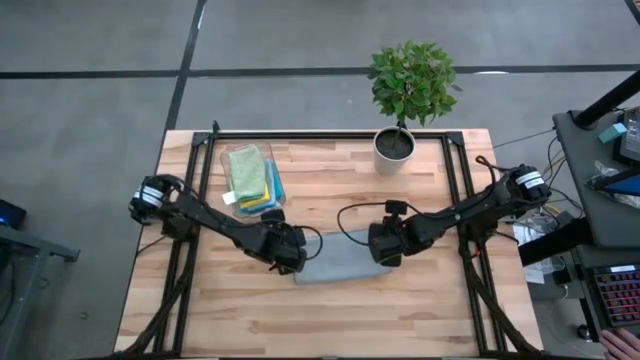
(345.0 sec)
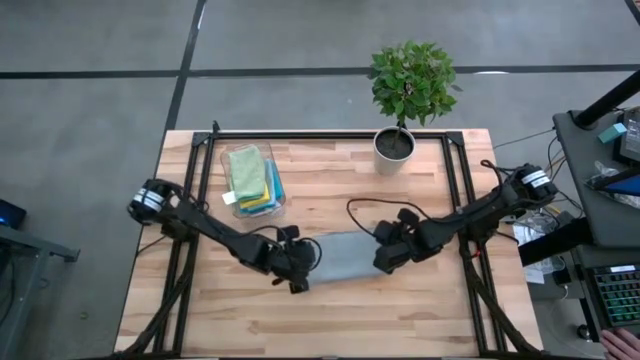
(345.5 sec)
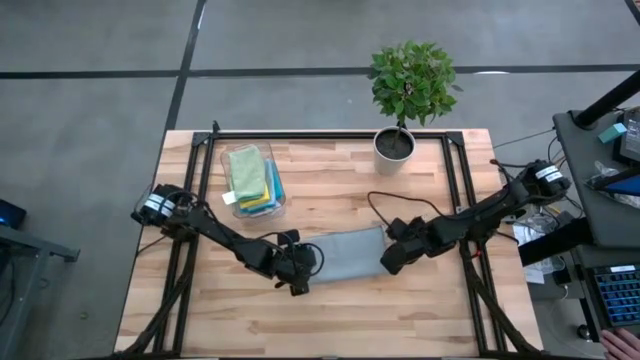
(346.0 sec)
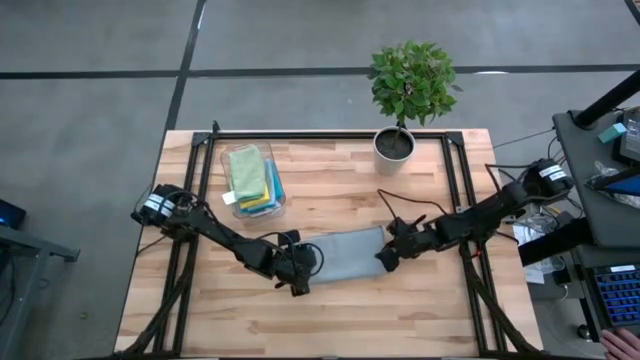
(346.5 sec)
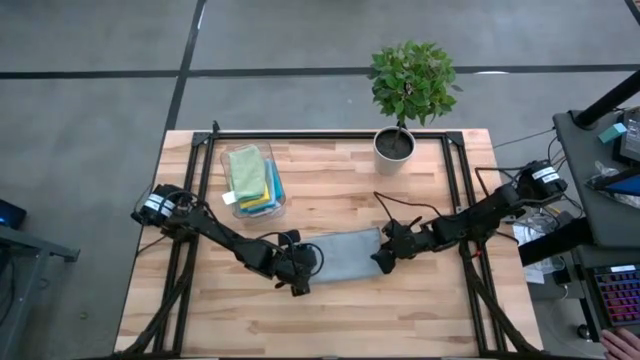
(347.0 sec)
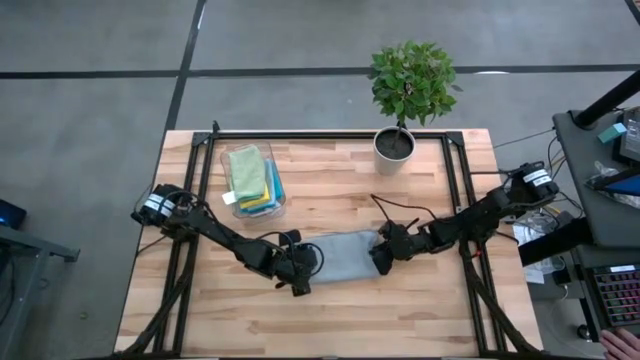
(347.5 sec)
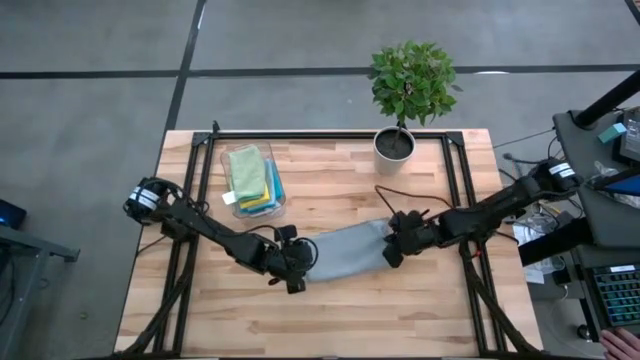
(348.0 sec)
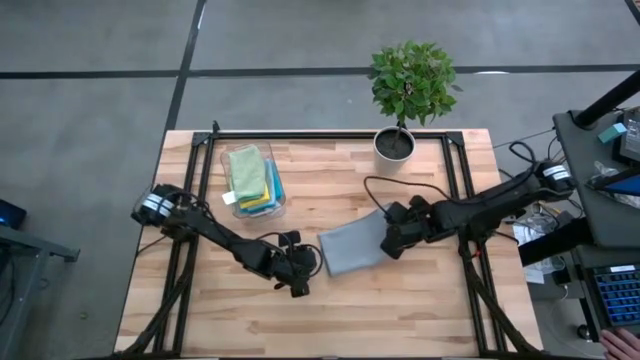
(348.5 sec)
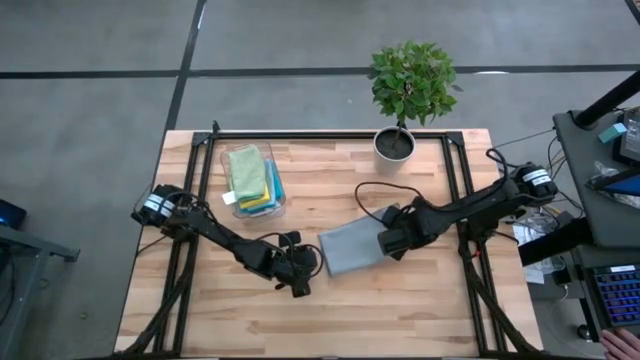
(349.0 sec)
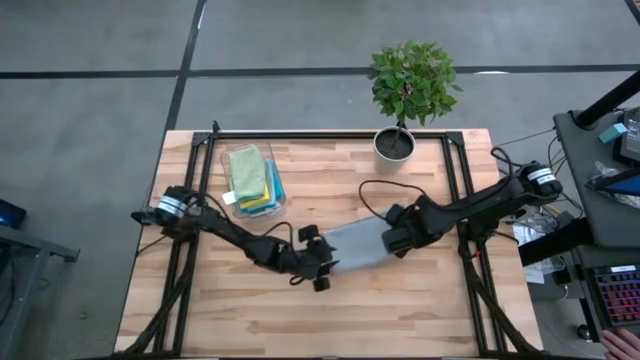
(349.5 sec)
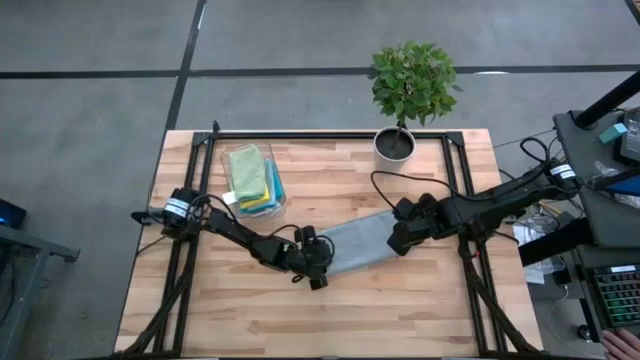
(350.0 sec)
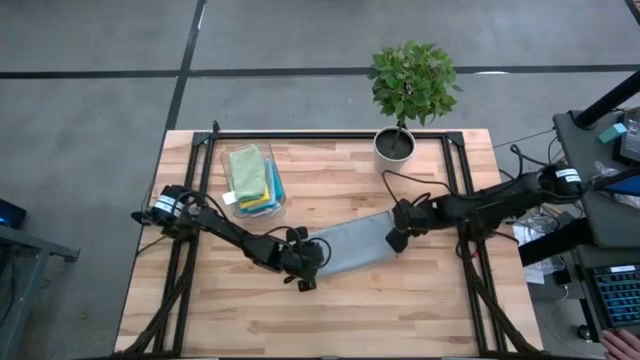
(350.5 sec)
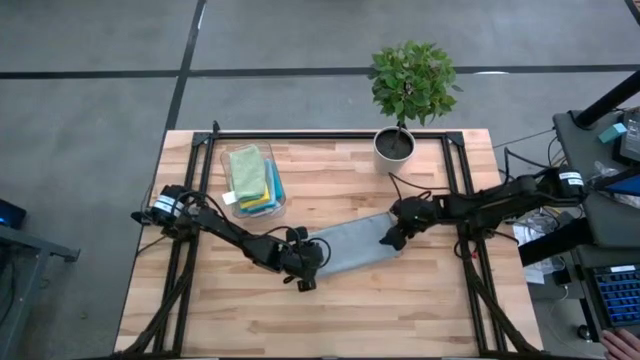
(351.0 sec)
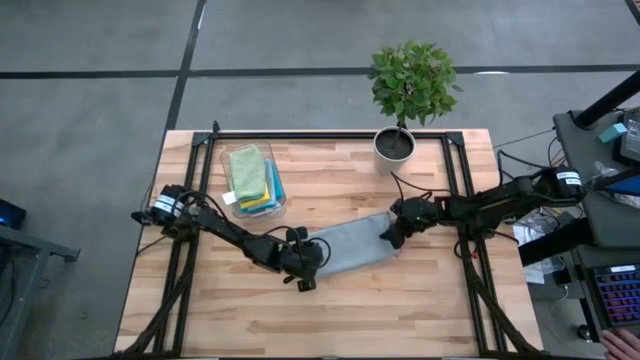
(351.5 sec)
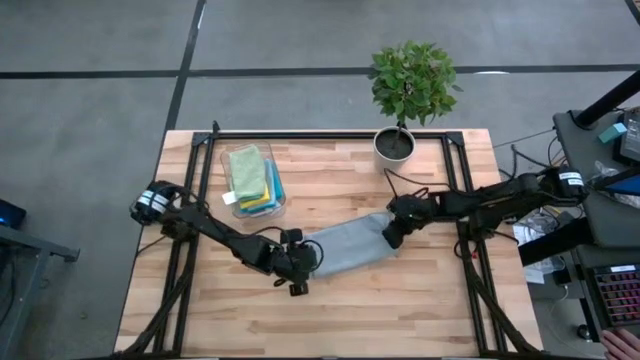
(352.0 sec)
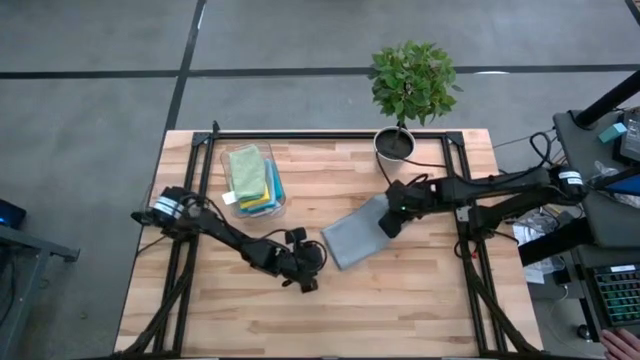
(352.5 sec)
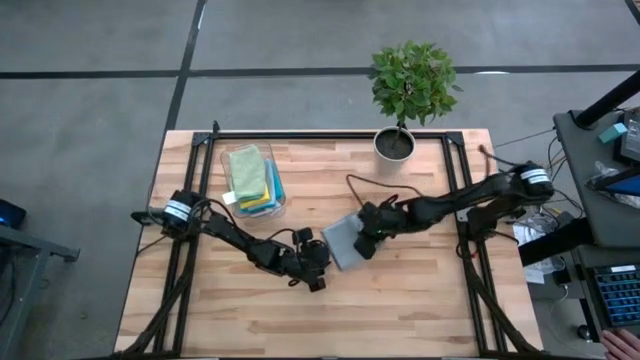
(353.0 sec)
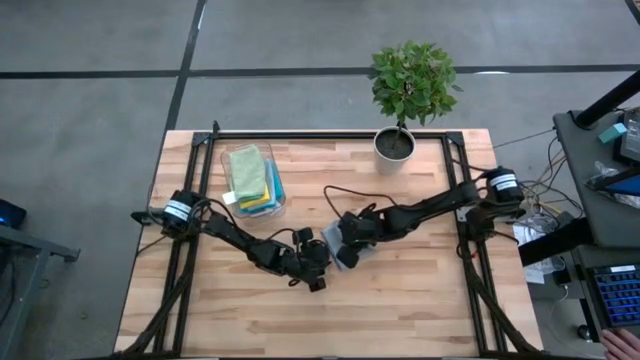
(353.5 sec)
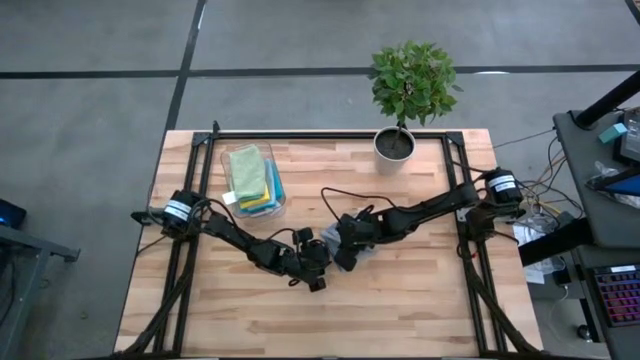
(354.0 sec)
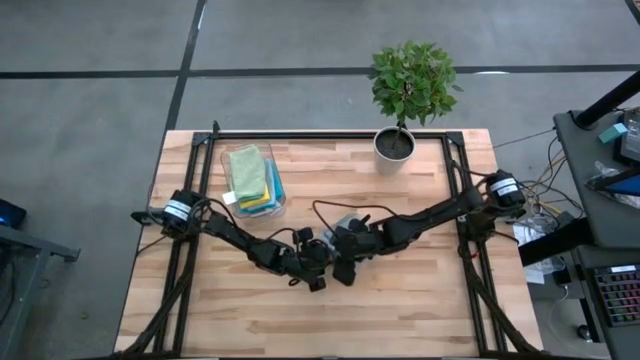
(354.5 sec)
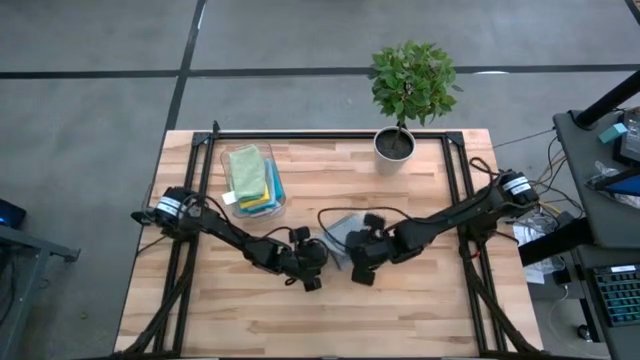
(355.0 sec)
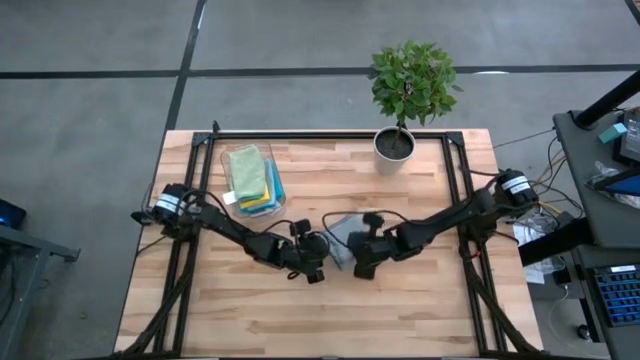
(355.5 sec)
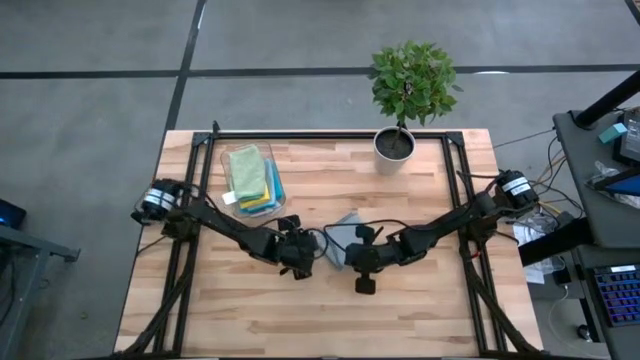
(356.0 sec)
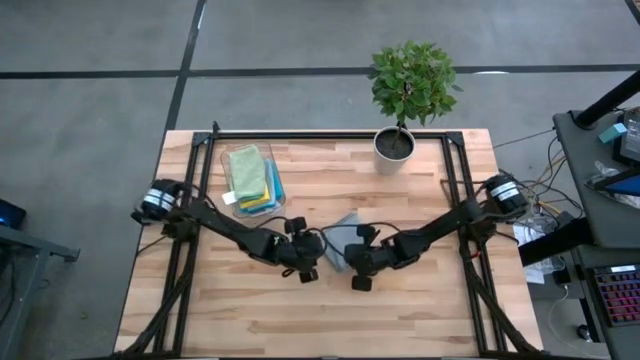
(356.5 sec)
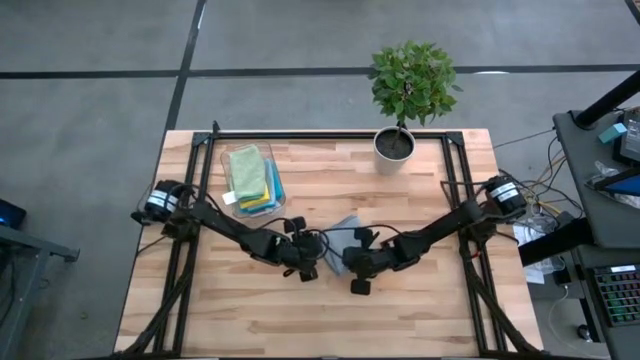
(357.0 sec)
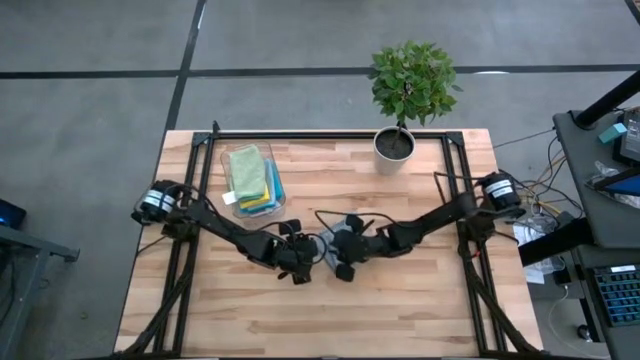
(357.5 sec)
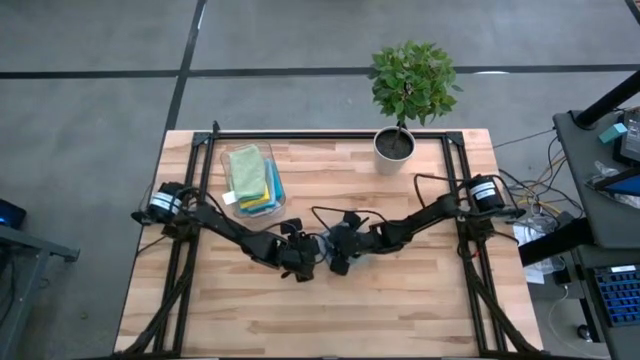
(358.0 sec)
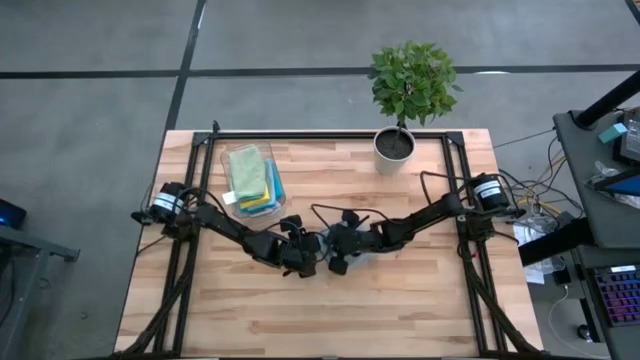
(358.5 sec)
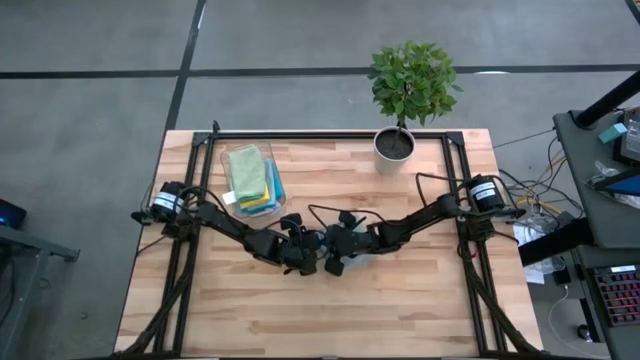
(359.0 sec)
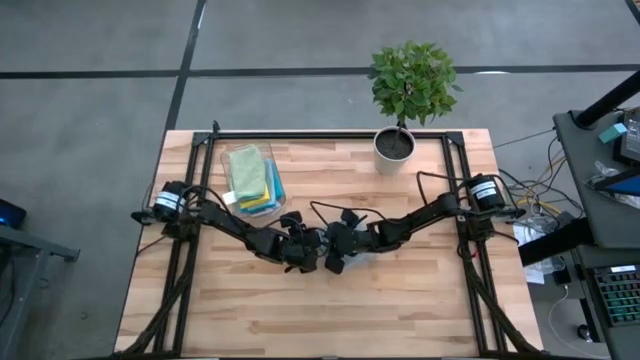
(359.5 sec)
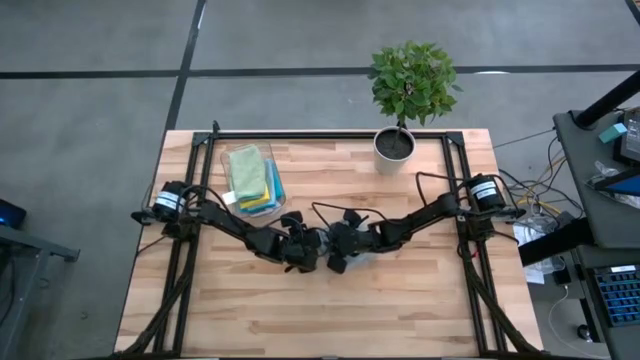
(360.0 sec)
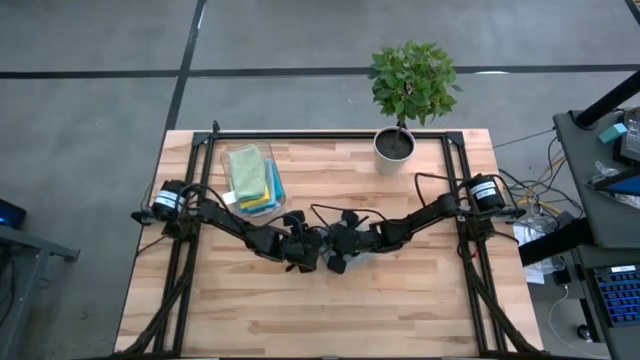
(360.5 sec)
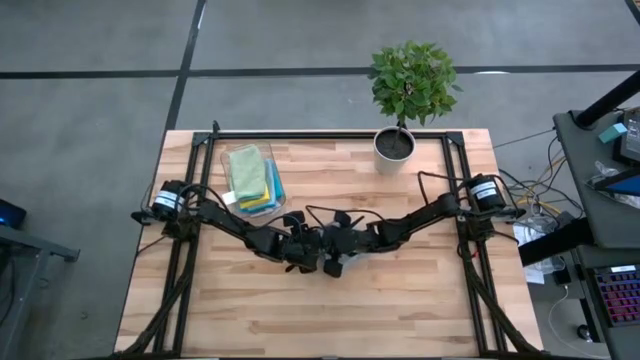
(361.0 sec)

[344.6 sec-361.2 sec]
Task: Fold microfiber towels
Fold the gray microfiber cloth

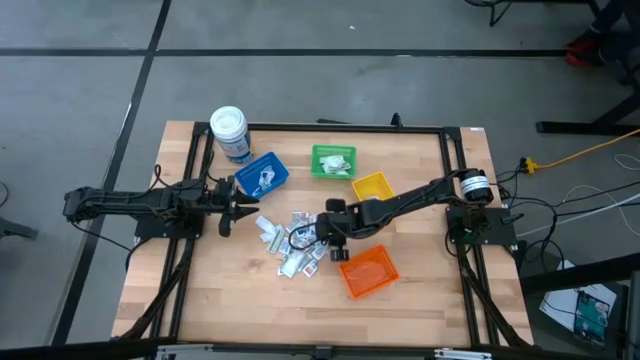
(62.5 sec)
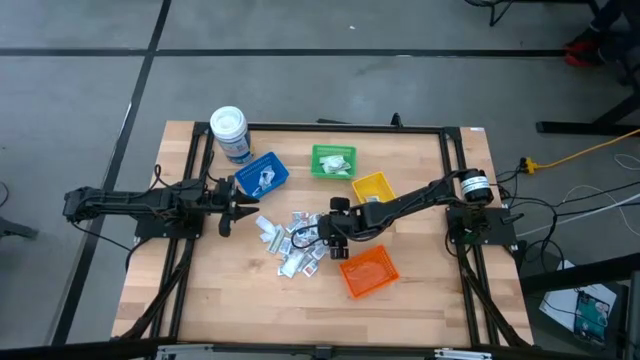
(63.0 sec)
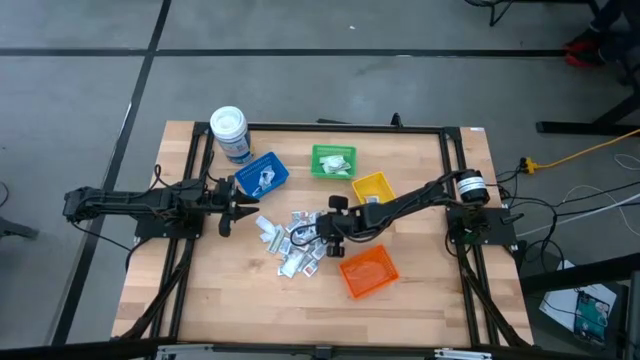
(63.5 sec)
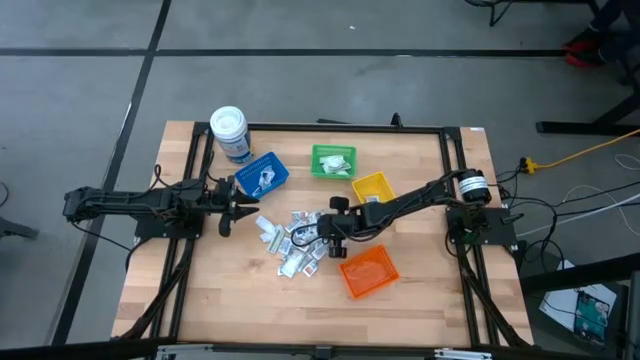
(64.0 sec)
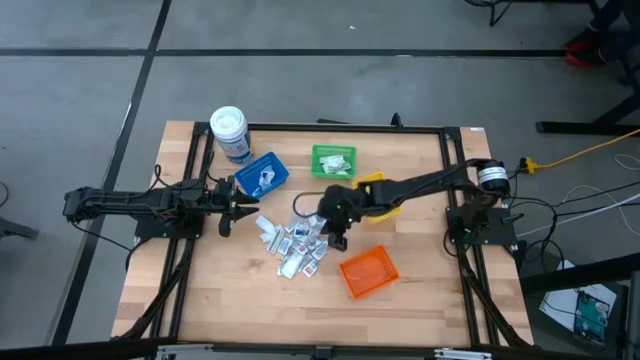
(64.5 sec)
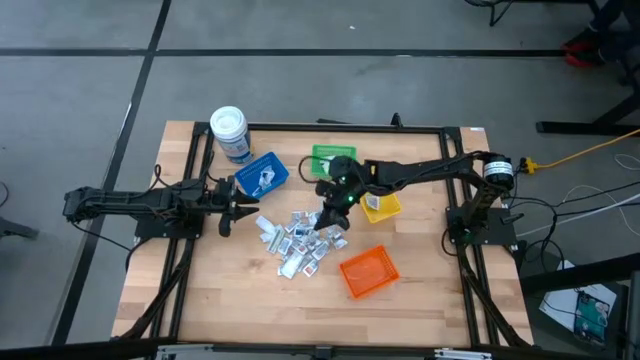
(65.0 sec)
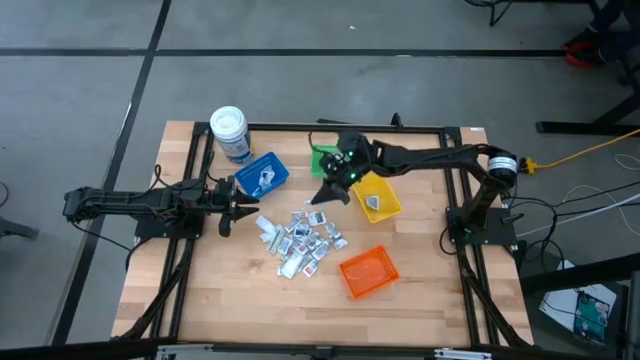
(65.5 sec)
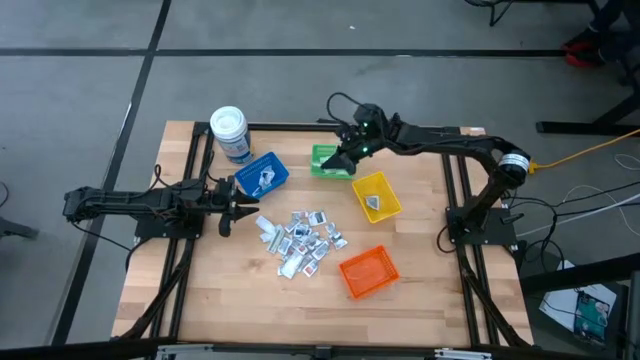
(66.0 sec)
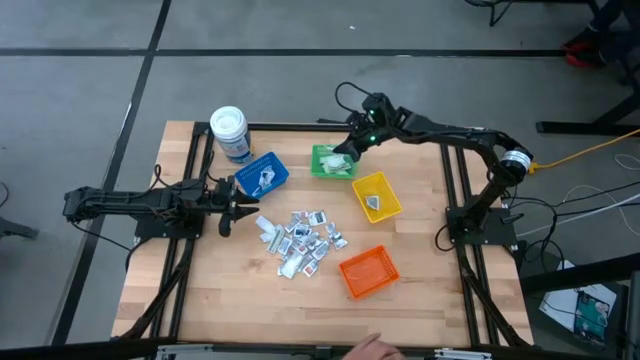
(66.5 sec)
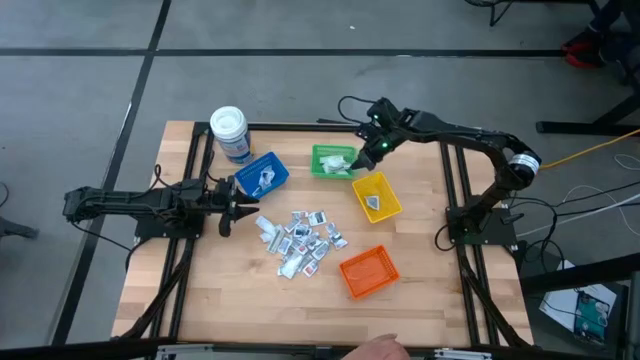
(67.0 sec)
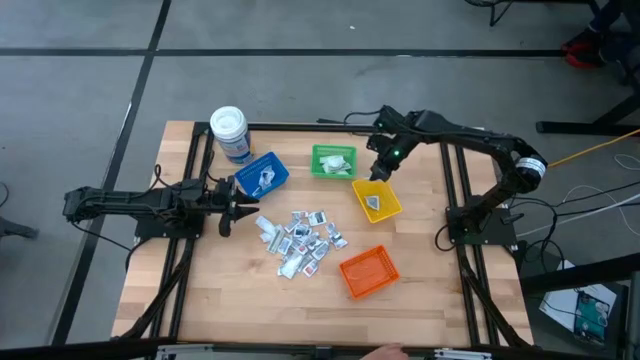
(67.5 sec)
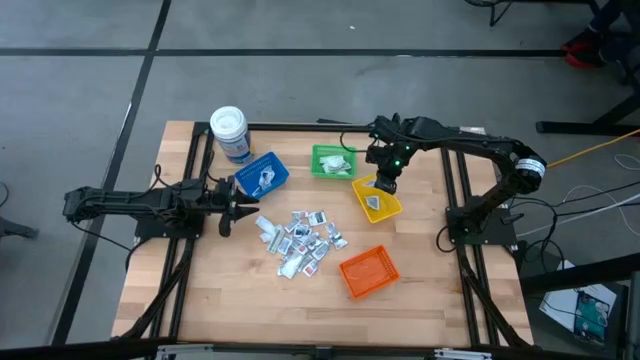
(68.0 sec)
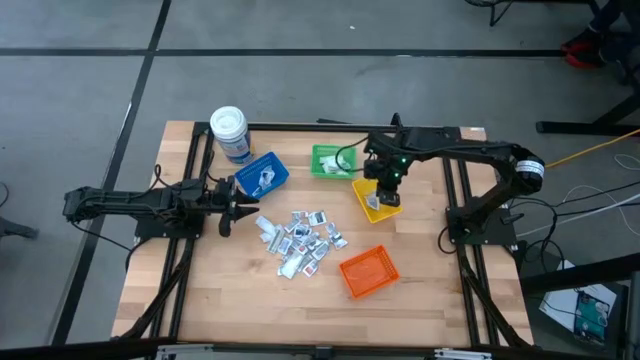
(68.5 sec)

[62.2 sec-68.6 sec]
Task: Pick & Place First Aid Supplies
Put the white towelette pack into the yellow bin
